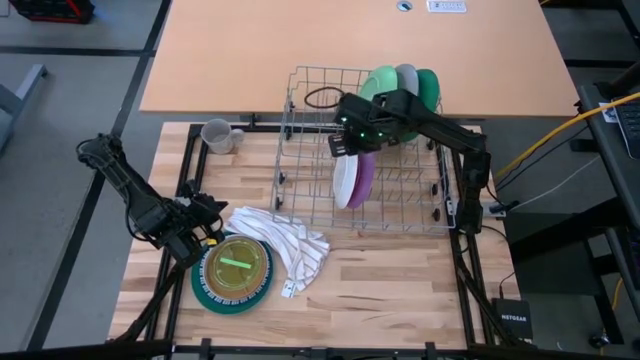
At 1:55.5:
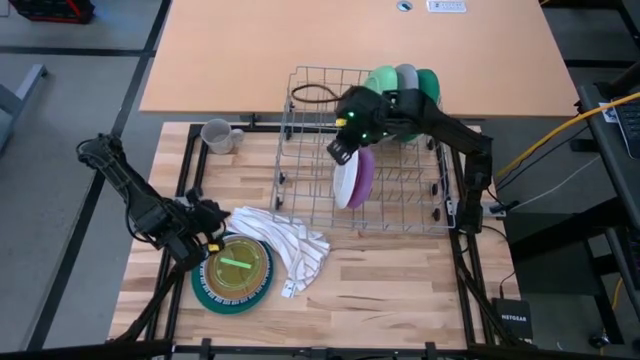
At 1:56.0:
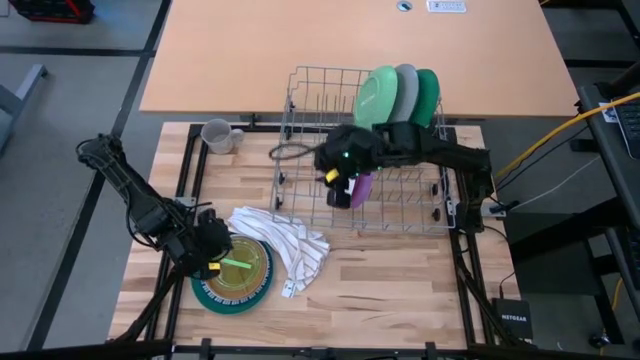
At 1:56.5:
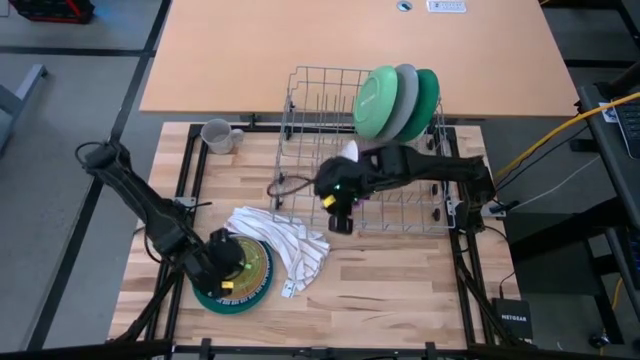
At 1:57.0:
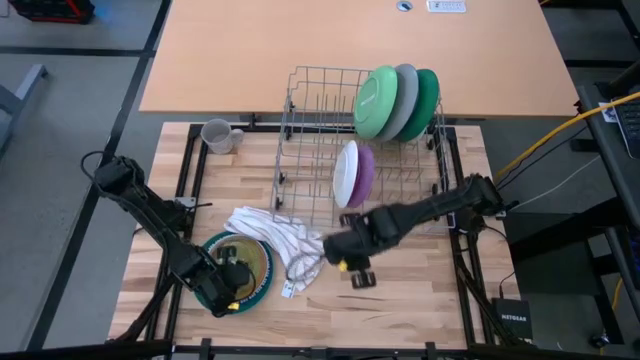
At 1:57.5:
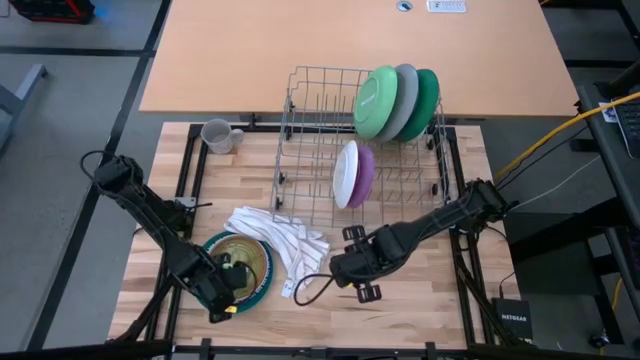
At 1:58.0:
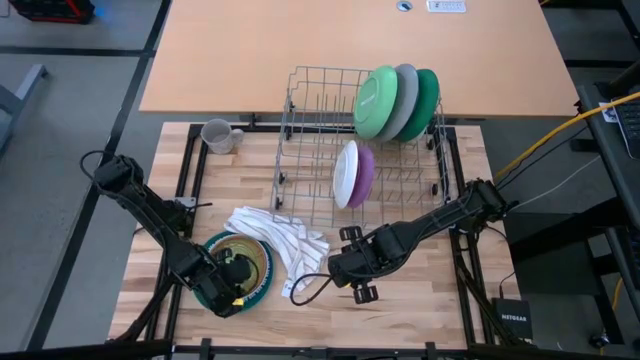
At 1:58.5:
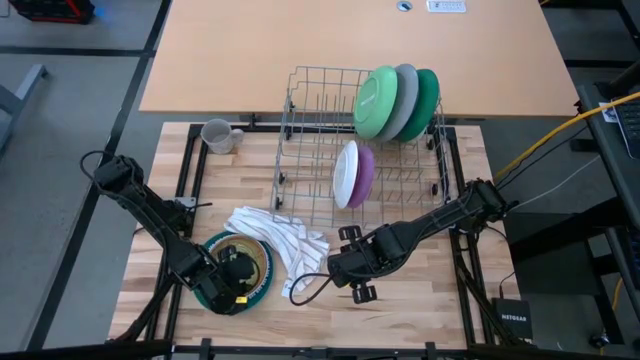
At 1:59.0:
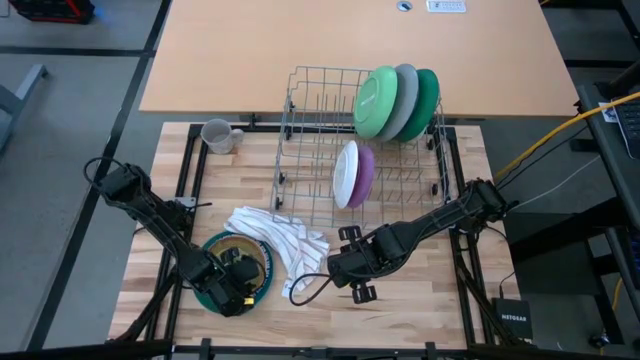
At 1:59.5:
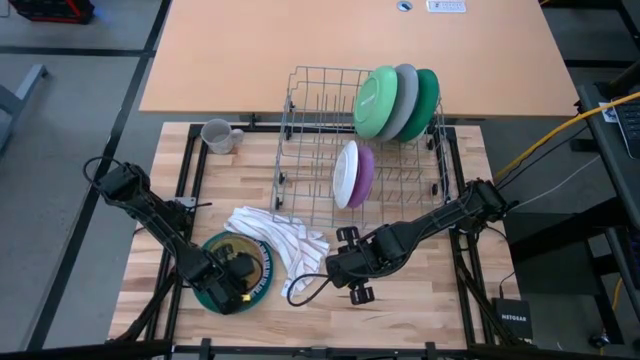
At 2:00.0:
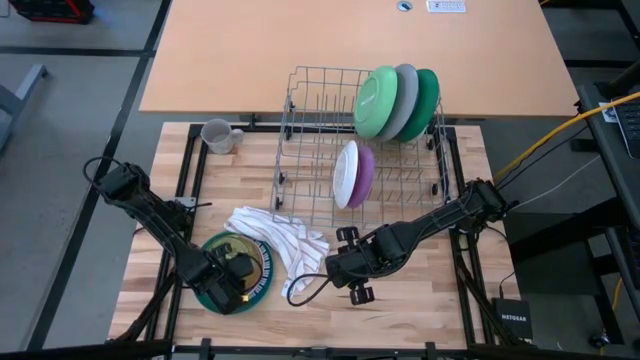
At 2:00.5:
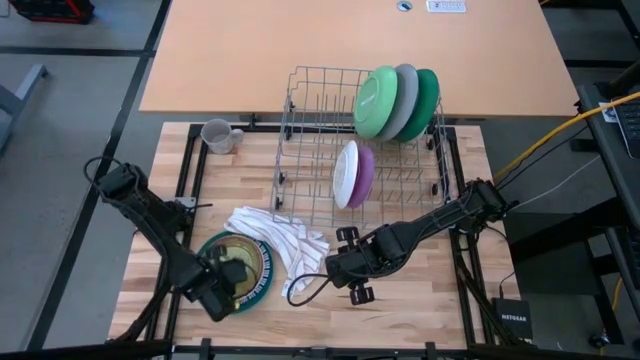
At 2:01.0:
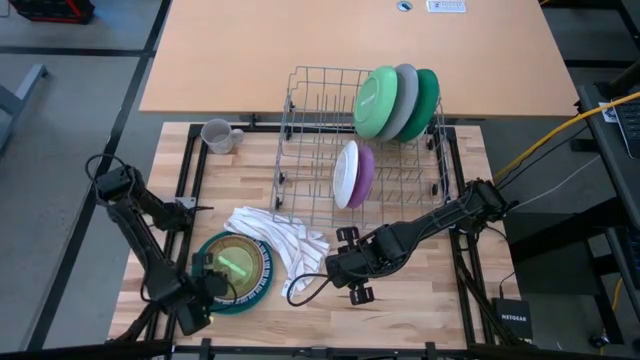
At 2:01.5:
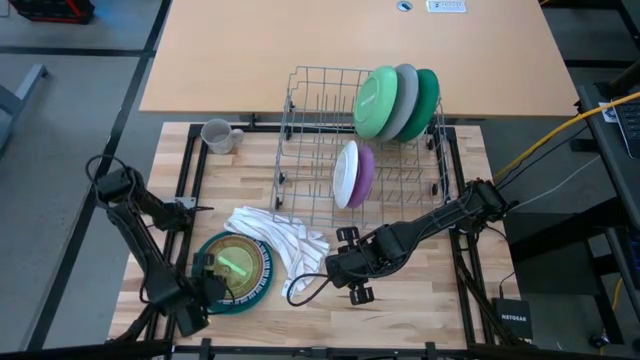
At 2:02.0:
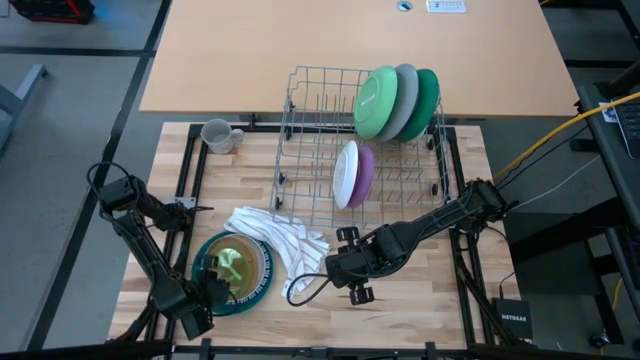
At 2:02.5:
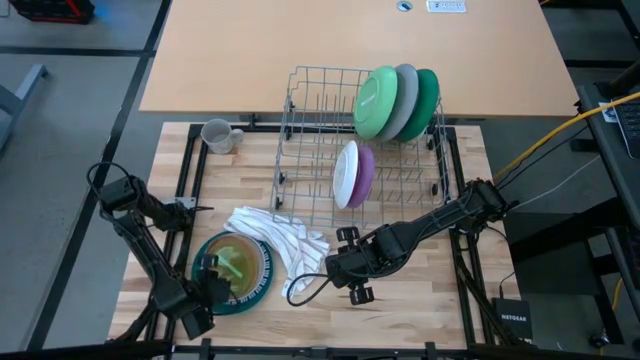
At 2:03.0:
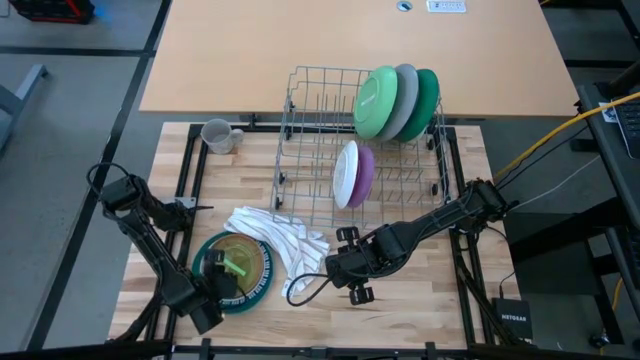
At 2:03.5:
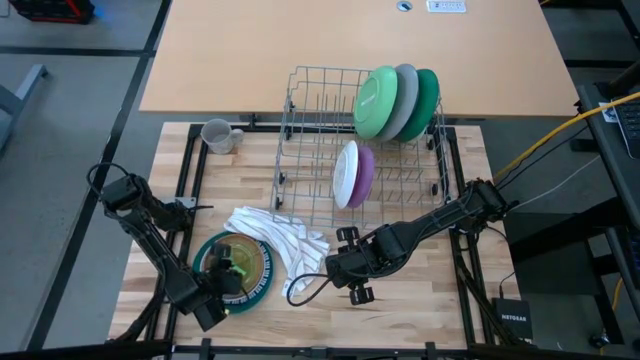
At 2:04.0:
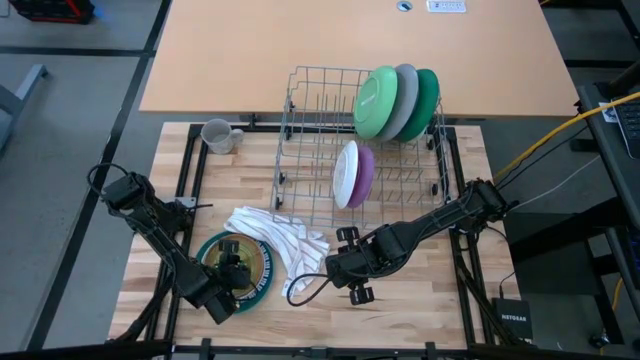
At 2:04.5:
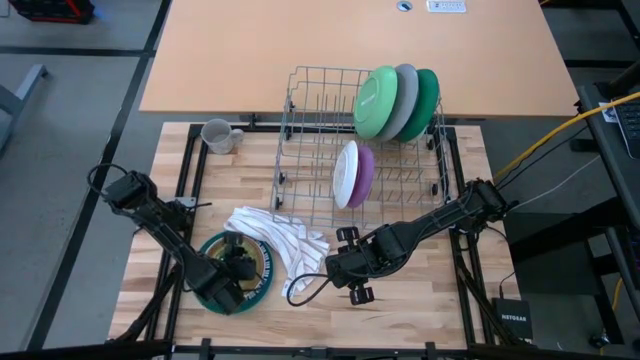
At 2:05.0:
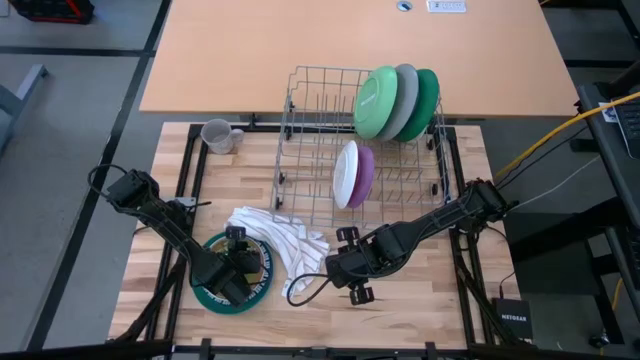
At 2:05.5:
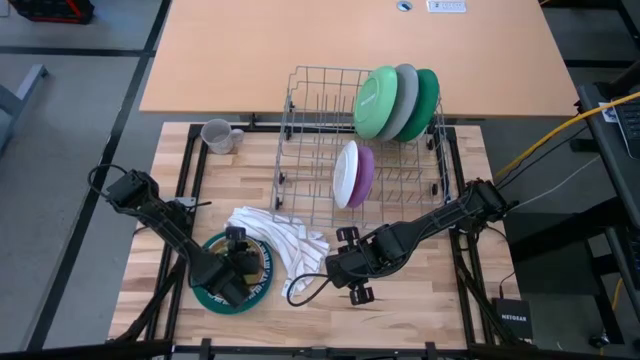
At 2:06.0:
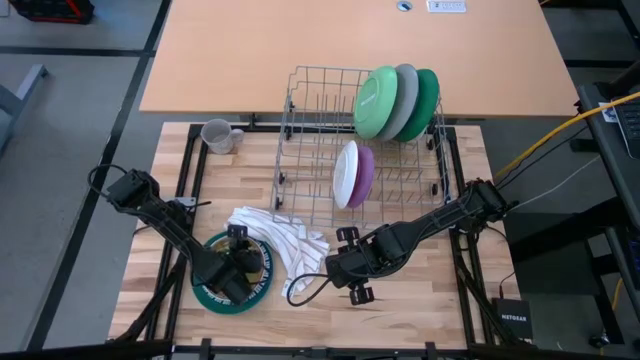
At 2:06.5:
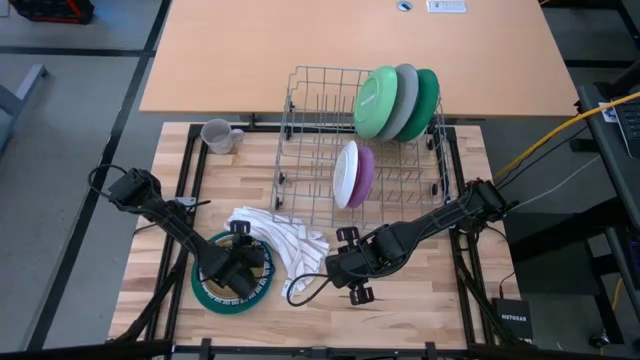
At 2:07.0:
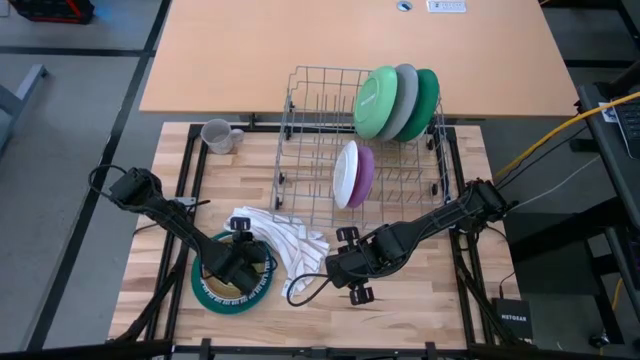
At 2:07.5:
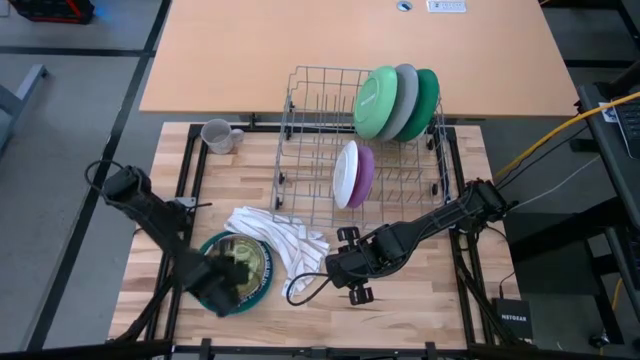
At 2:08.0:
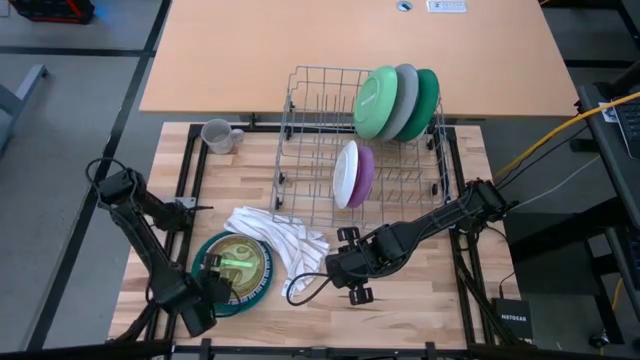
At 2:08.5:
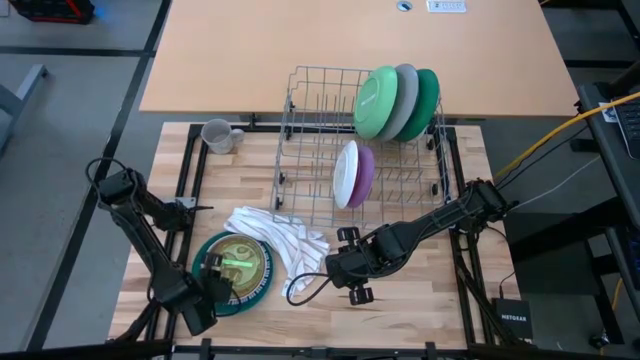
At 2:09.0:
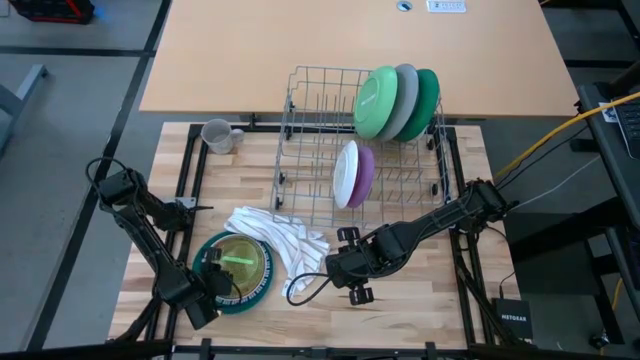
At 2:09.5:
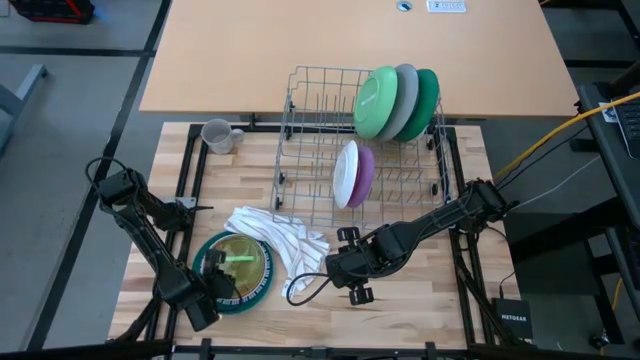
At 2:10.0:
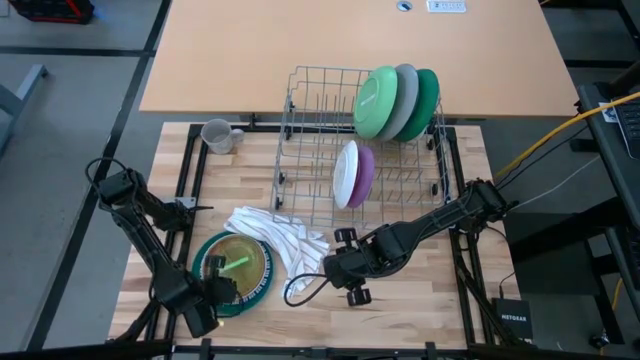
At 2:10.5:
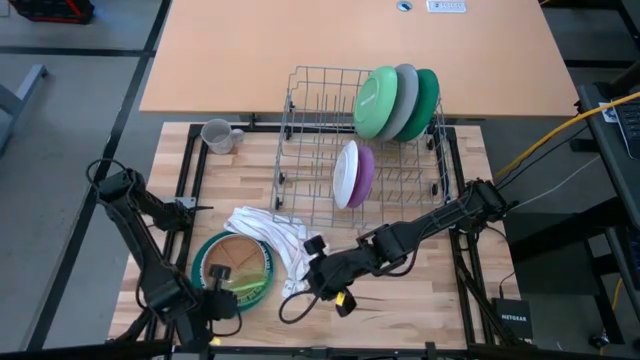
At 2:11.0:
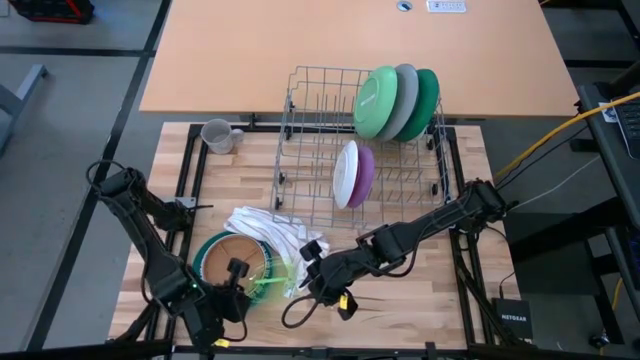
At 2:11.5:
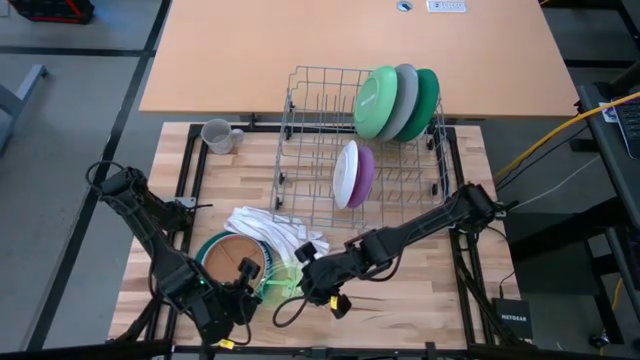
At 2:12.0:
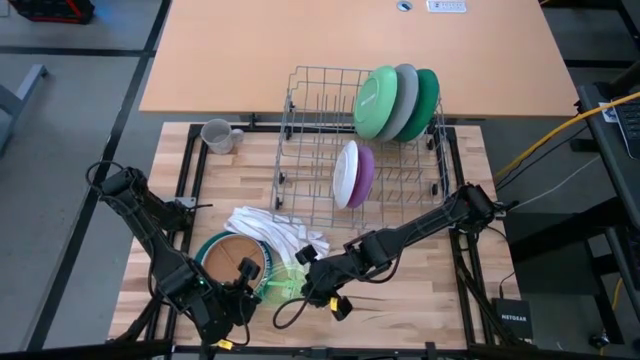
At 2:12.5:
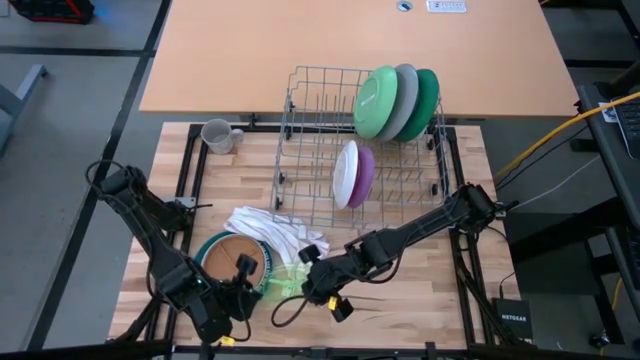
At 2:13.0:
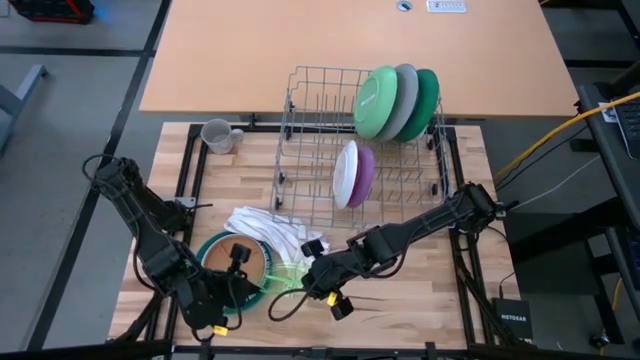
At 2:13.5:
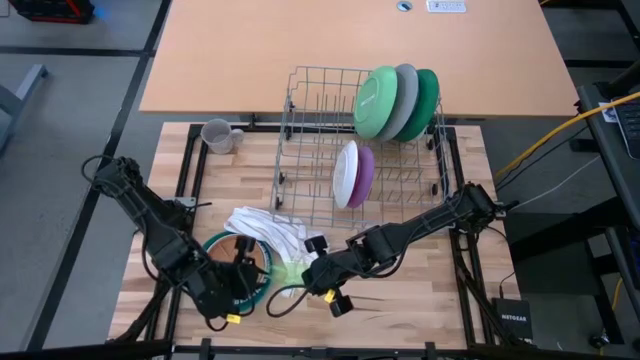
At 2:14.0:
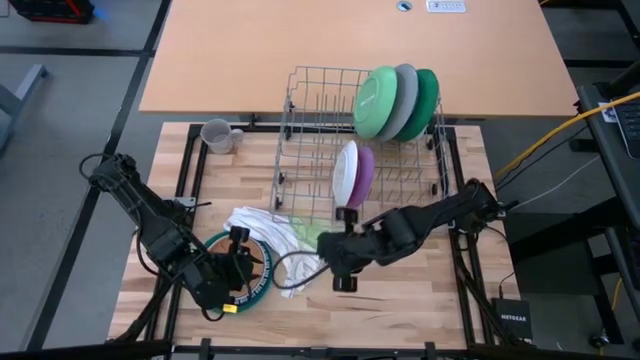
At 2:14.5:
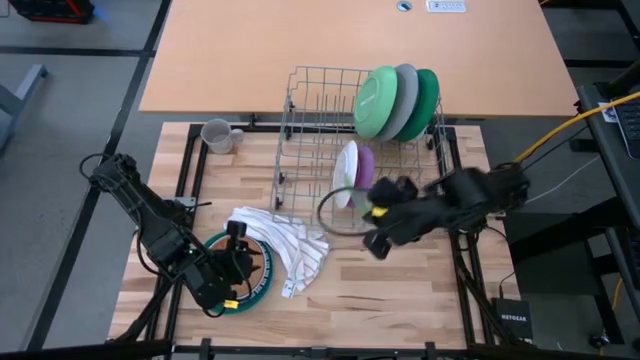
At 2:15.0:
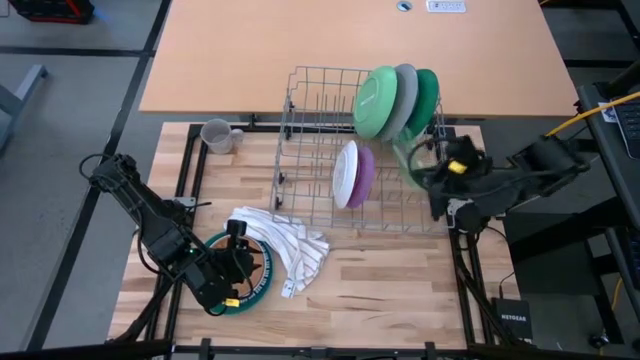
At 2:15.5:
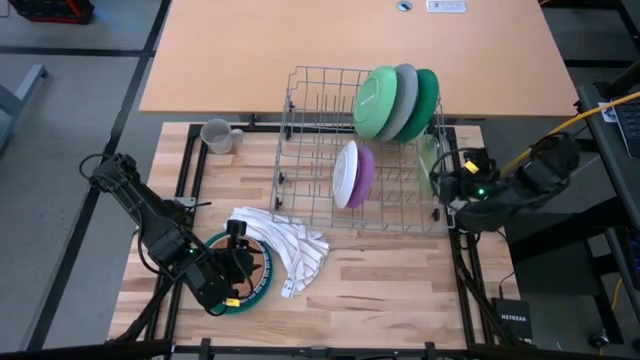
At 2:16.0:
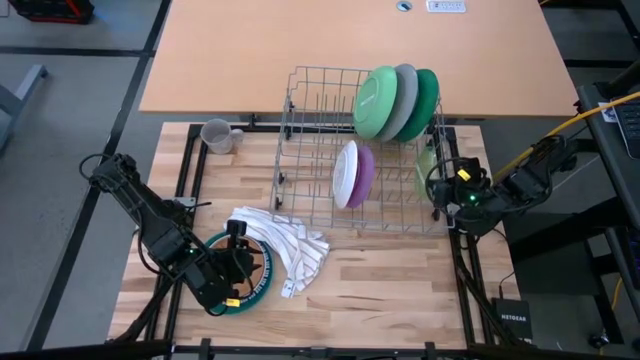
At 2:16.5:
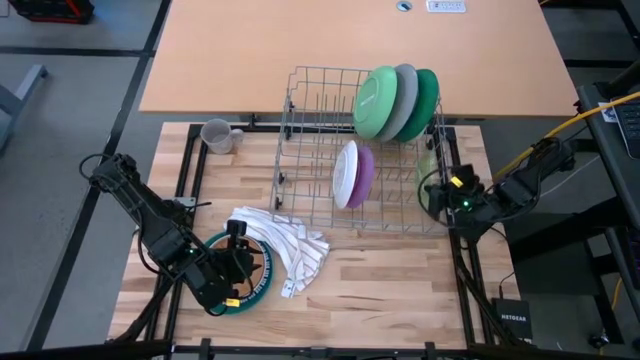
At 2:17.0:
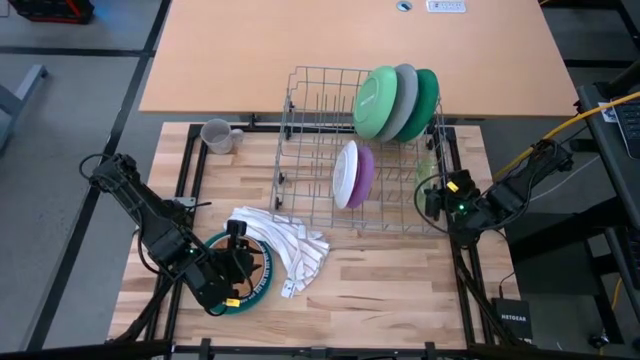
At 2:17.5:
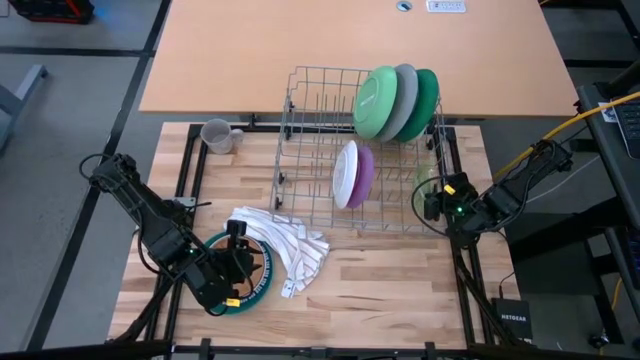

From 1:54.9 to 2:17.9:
Task: Sort dishes
Put the transparent green plate into the dish rack
